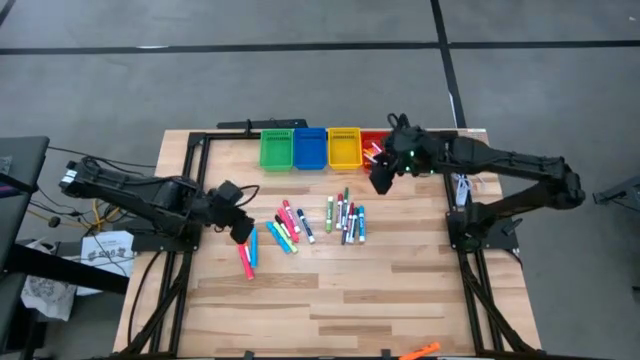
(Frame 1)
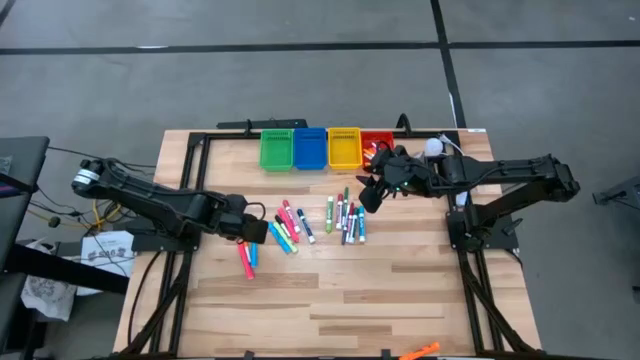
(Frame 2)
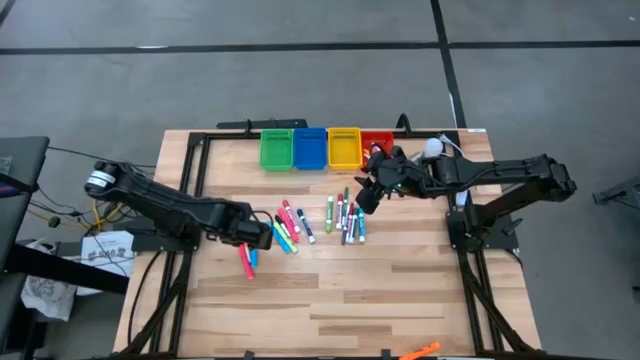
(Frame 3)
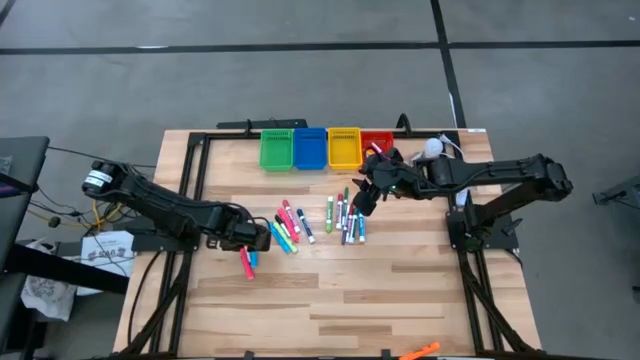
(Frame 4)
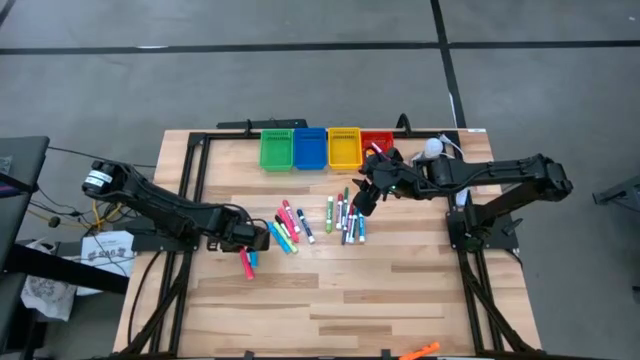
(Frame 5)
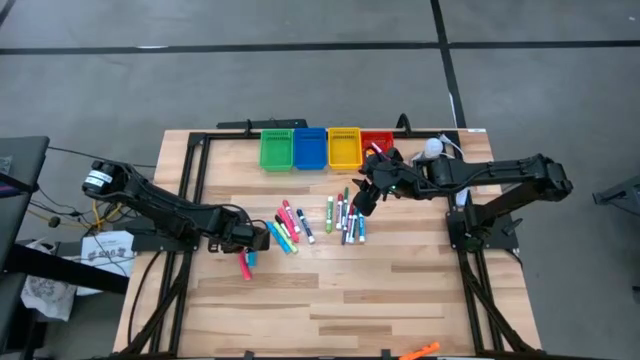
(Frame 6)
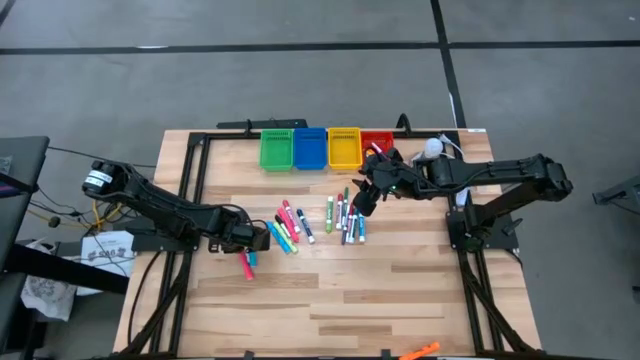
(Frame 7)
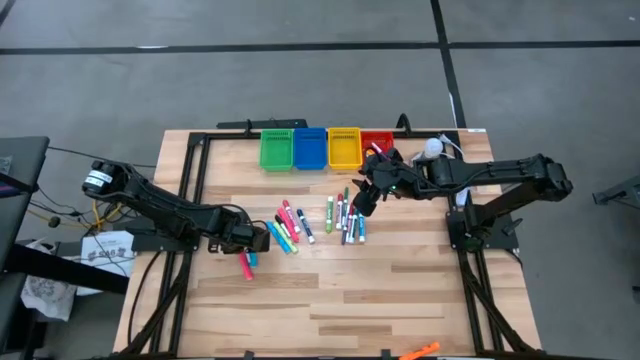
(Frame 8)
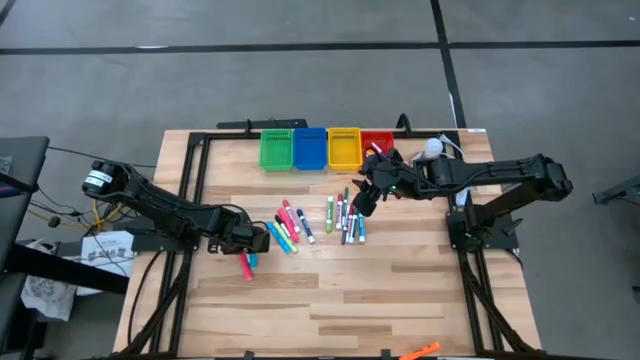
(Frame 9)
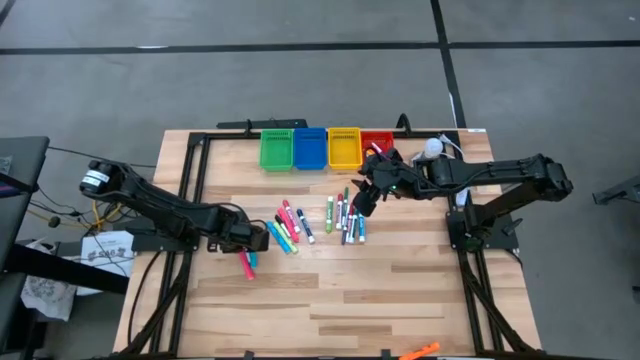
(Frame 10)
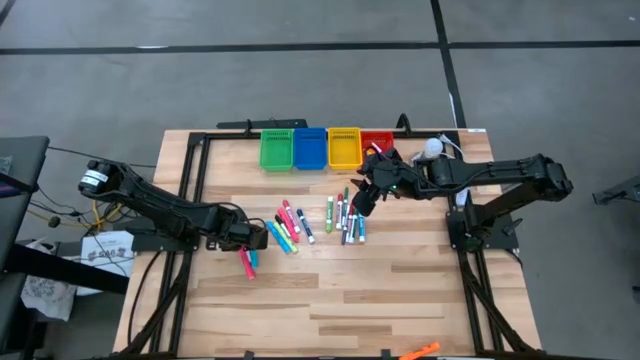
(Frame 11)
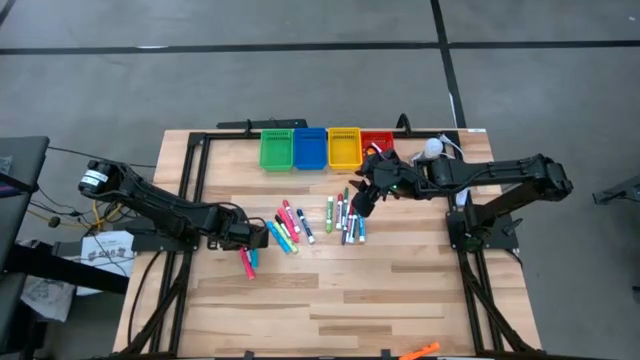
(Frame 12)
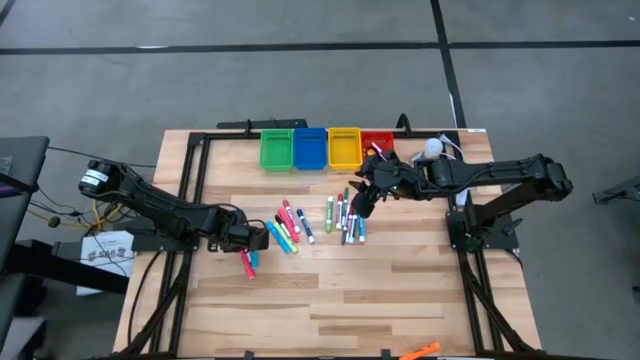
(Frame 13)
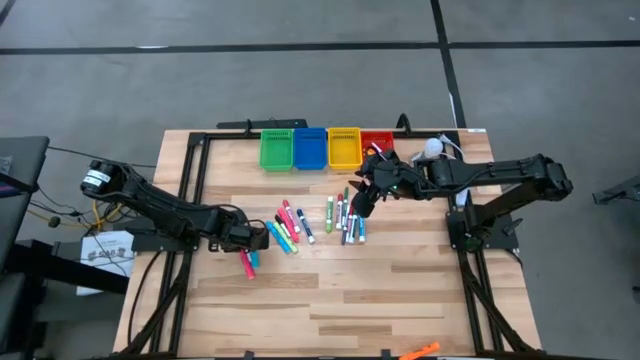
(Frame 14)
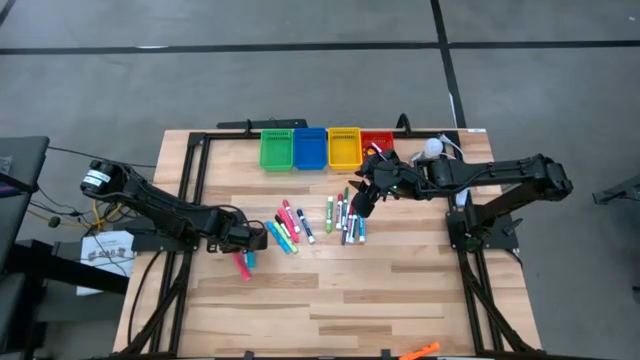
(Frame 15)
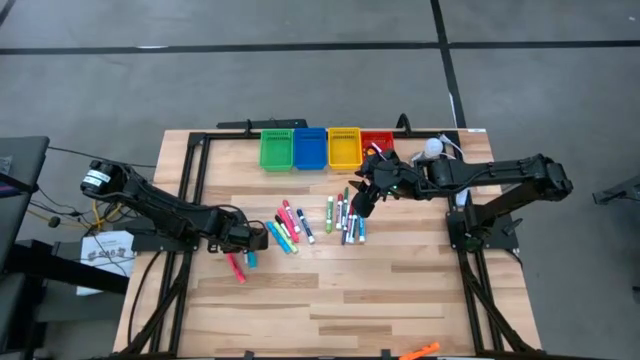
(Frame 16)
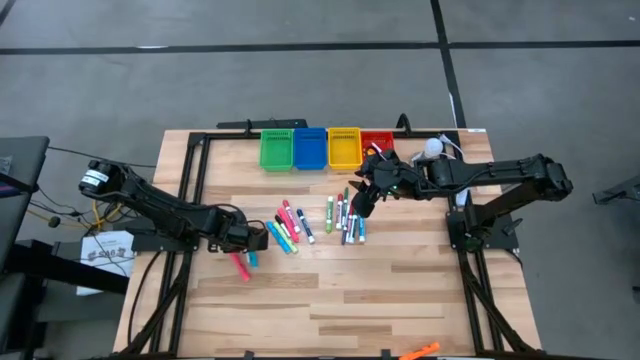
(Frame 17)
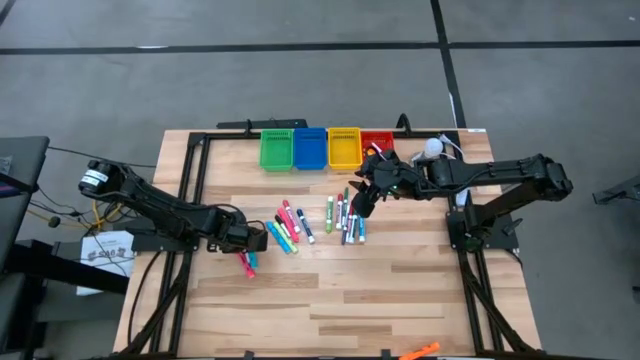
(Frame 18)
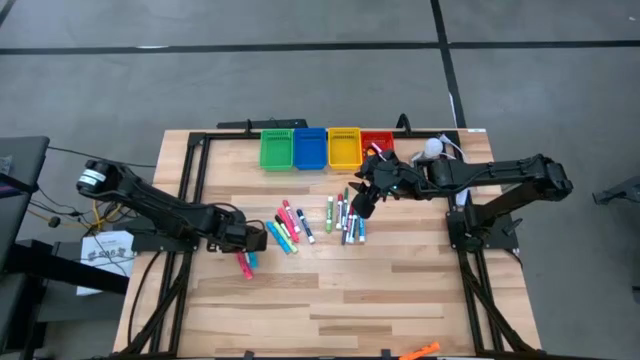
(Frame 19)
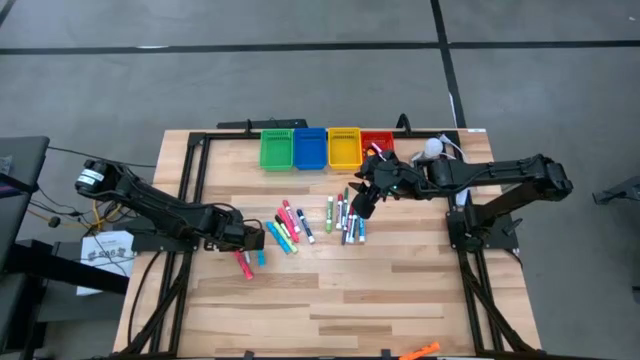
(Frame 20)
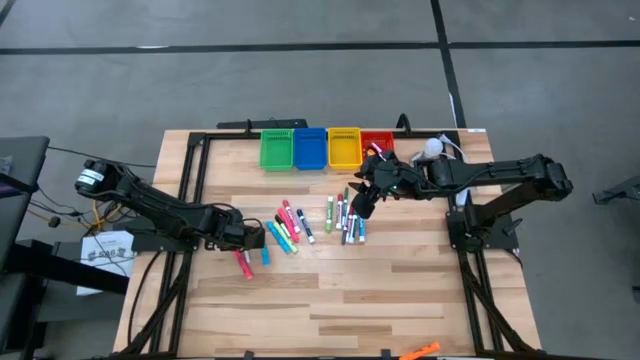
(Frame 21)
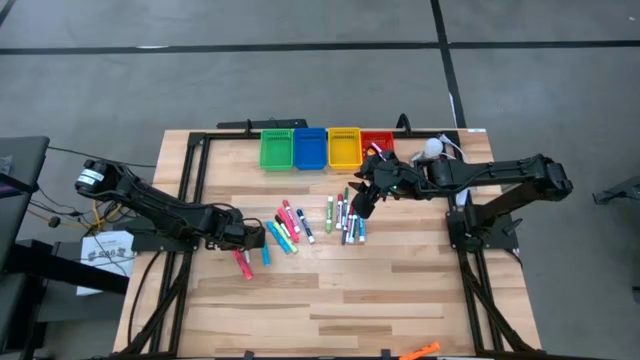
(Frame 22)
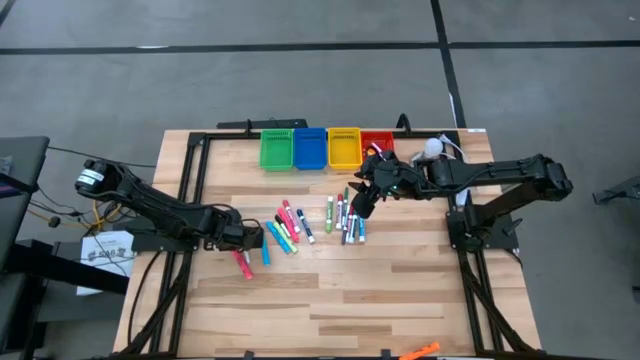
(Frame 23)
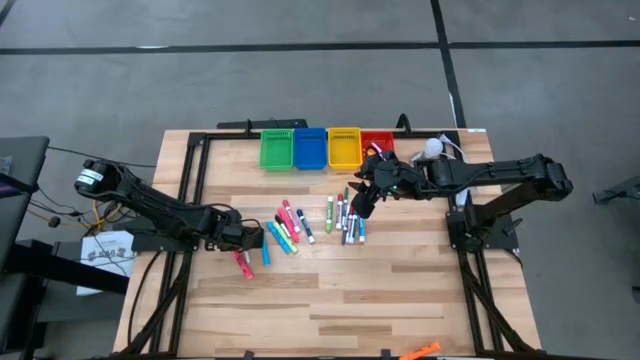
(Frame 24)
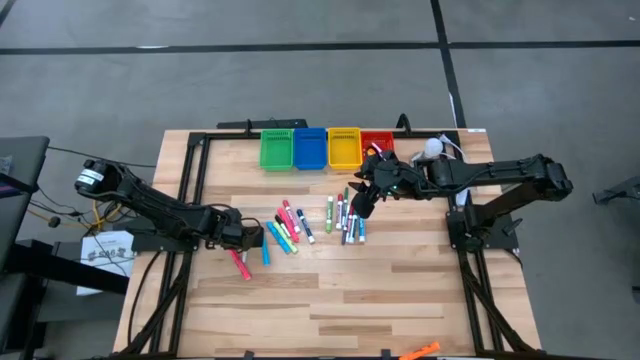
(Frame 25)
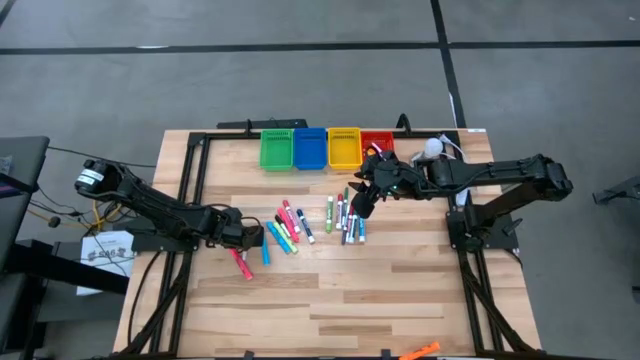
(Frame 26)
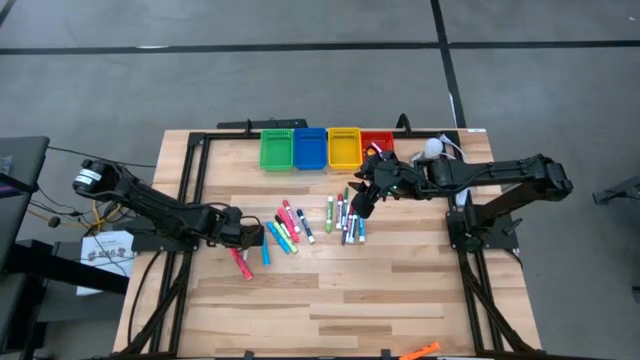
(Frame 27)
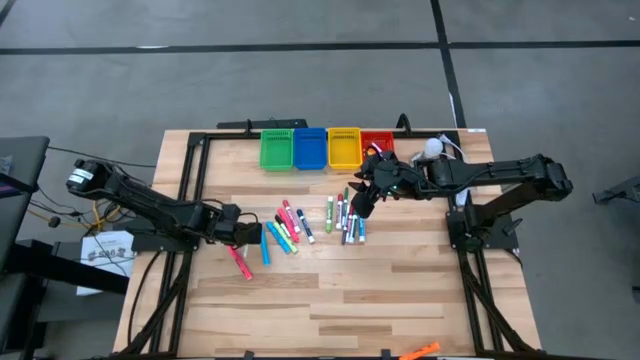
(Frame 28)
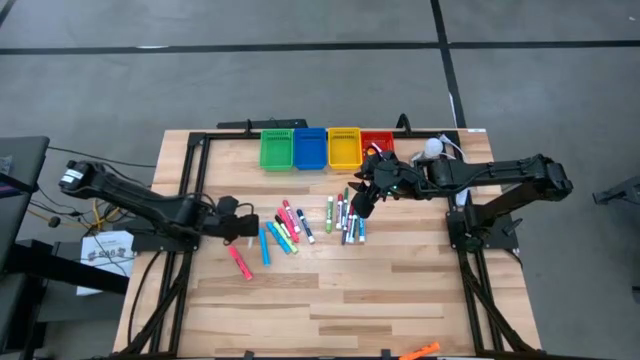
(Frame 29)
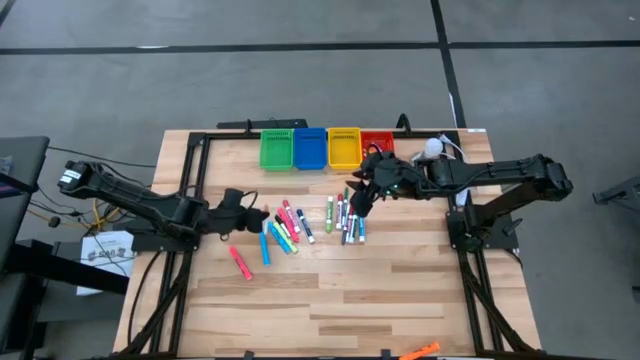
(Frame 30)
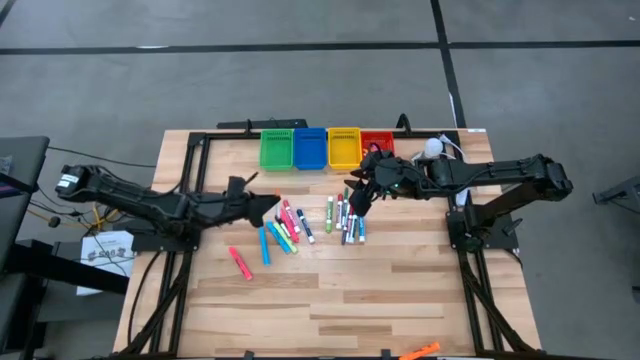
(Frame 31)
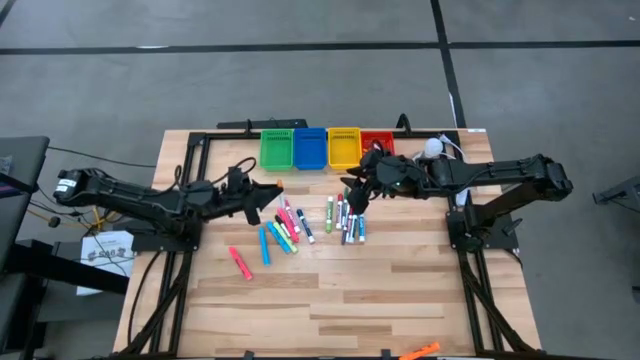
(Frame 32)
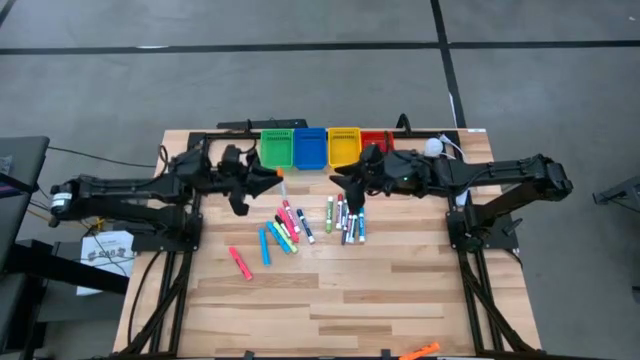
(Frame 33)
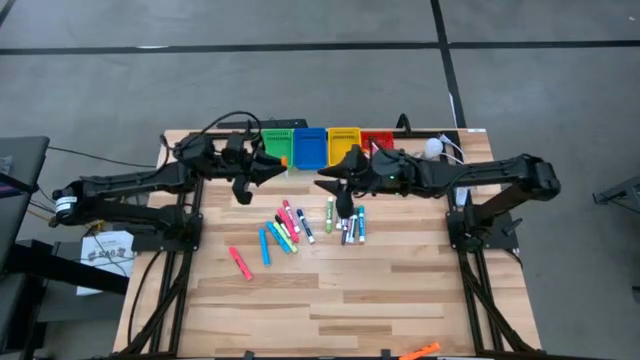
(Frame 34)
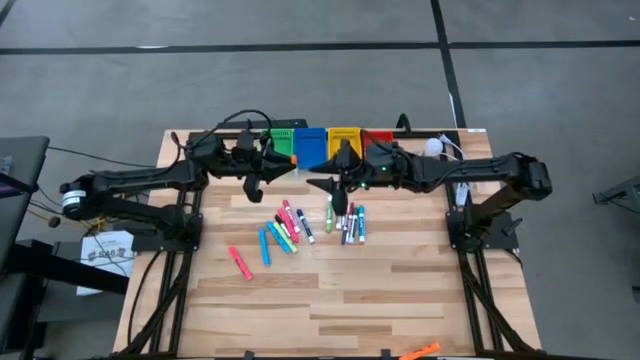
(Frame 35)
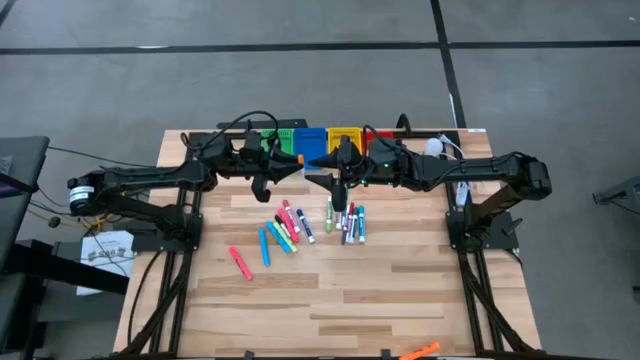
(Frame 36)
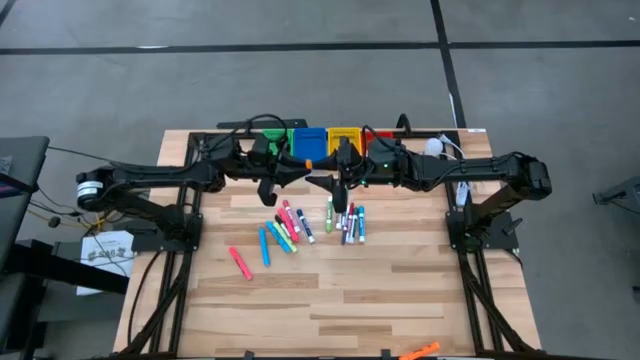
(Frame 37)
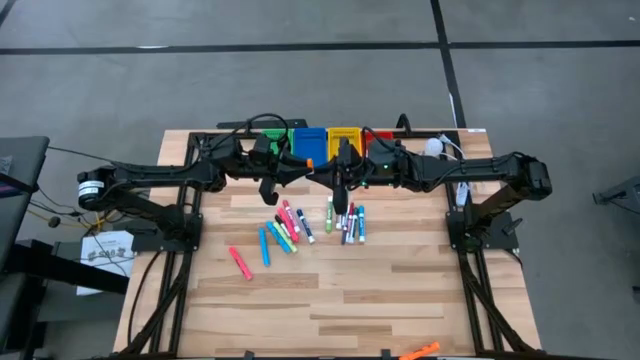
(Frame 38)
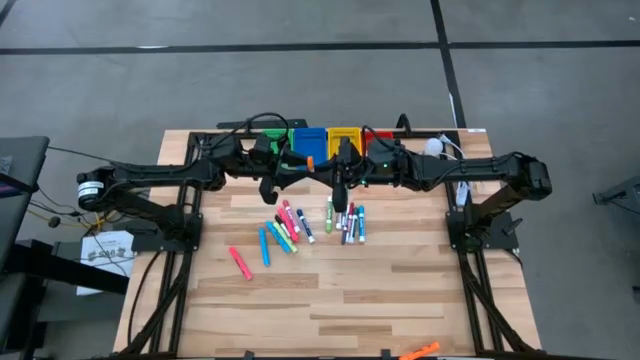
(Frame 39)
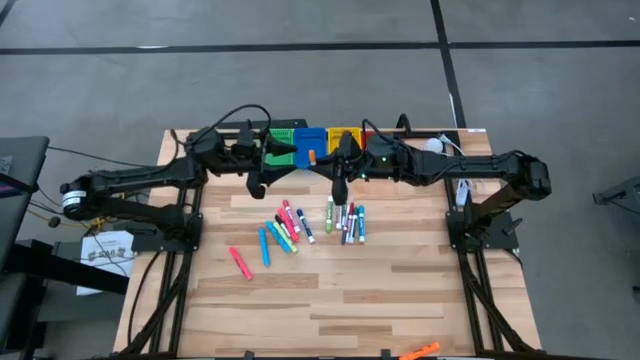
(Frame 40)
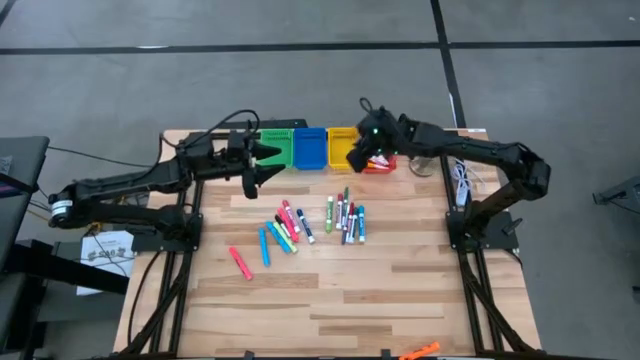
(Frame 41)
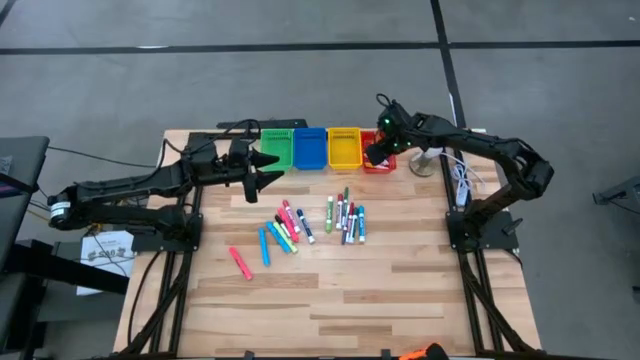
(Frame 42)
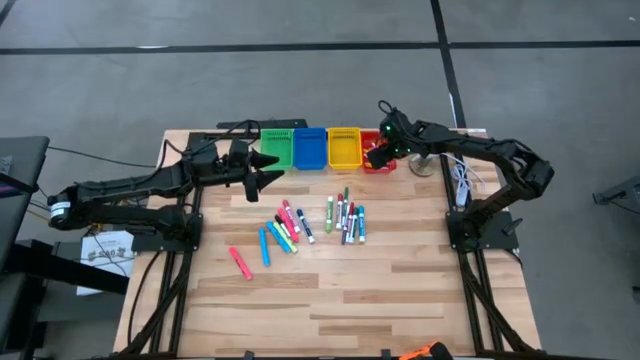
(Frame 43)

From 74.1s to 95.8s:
Task: Pick & Place Markers
Put the orange mini marker into the red basket
